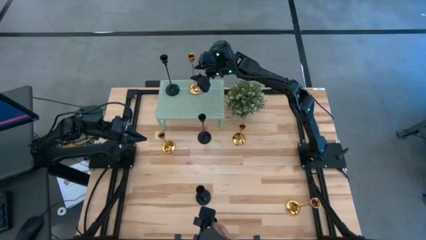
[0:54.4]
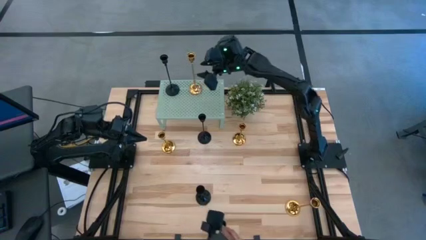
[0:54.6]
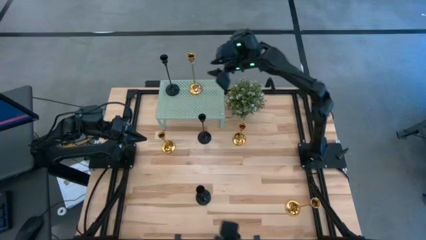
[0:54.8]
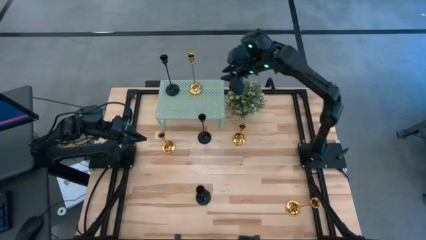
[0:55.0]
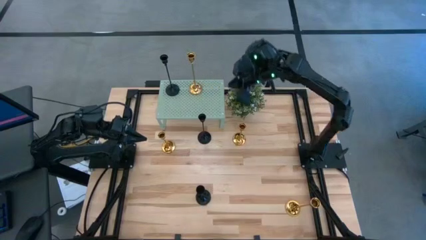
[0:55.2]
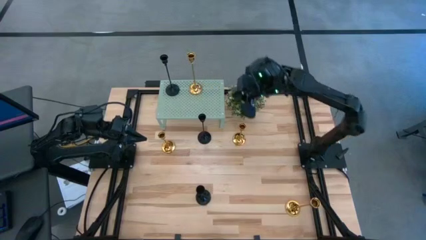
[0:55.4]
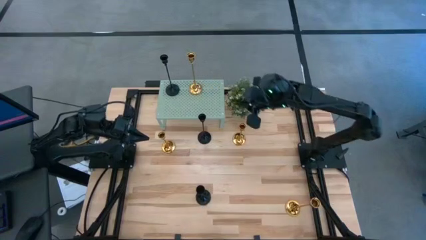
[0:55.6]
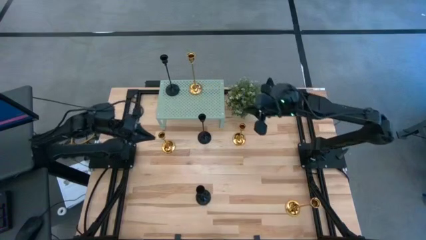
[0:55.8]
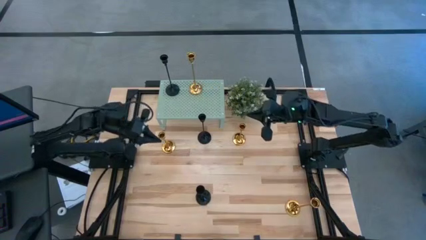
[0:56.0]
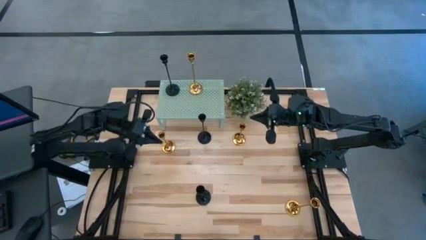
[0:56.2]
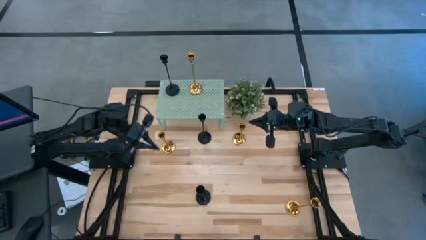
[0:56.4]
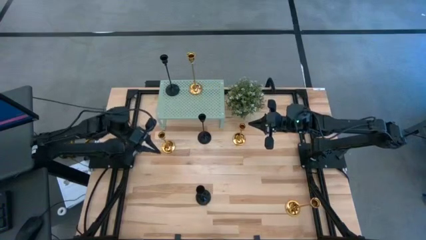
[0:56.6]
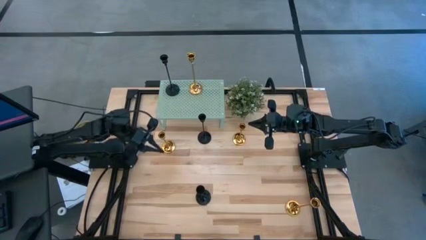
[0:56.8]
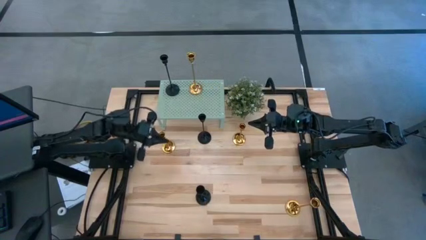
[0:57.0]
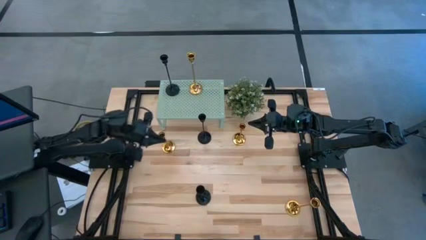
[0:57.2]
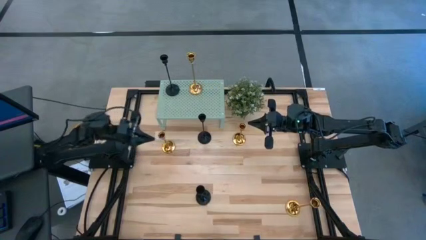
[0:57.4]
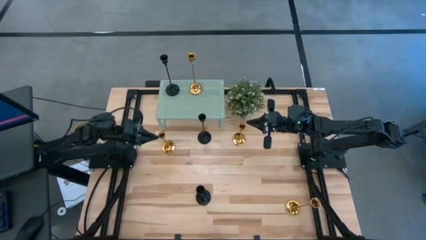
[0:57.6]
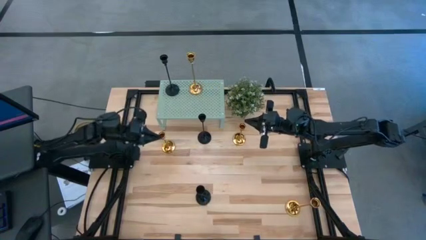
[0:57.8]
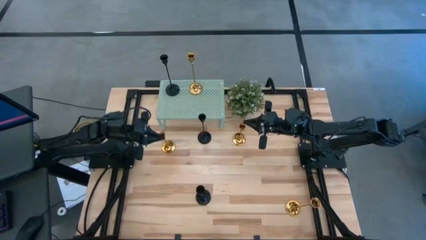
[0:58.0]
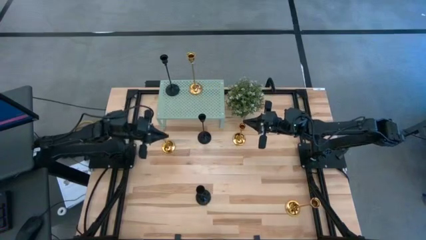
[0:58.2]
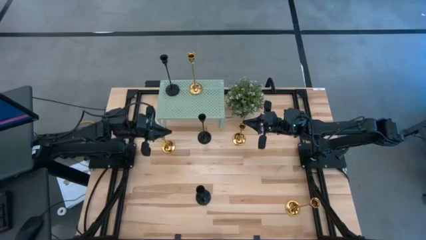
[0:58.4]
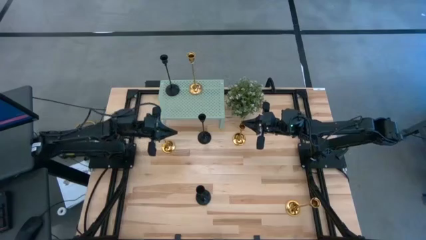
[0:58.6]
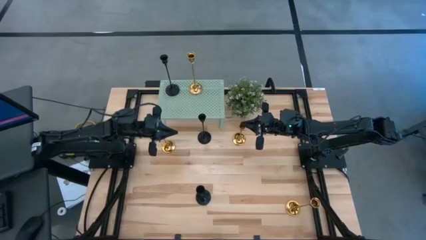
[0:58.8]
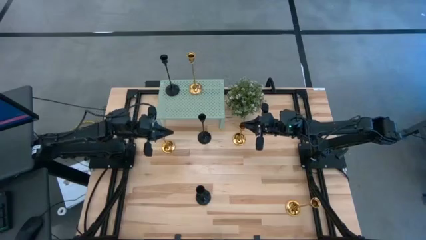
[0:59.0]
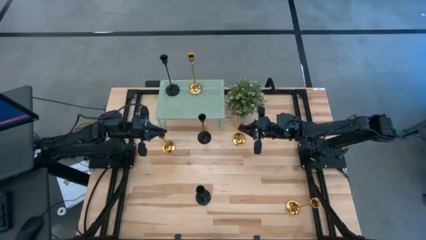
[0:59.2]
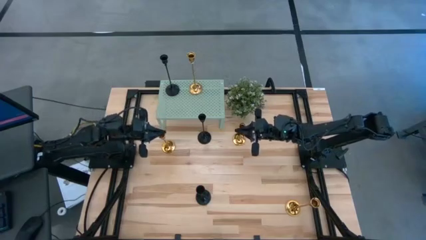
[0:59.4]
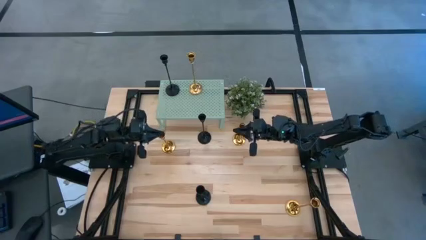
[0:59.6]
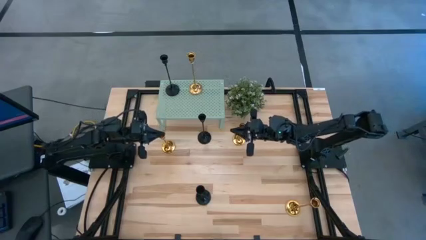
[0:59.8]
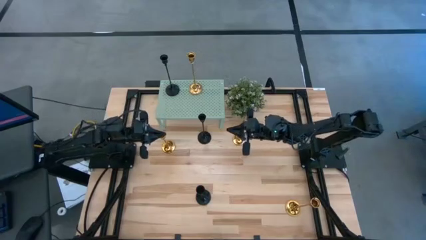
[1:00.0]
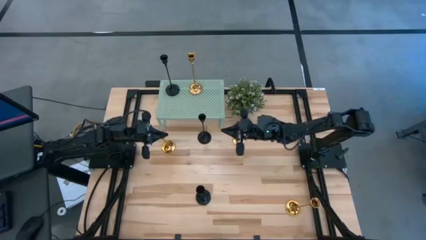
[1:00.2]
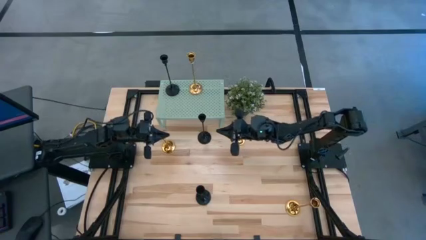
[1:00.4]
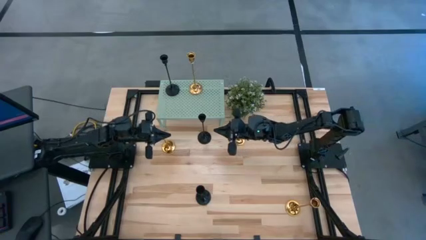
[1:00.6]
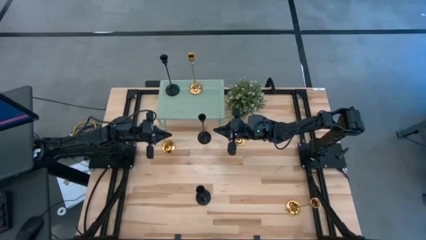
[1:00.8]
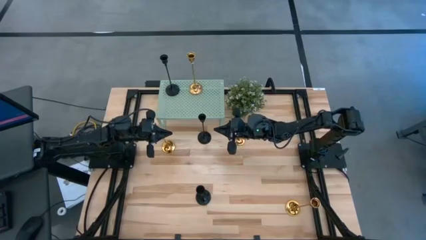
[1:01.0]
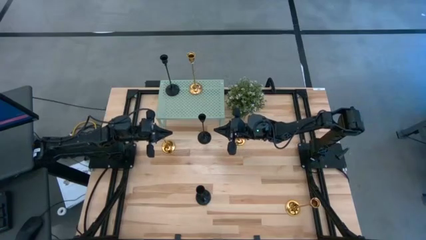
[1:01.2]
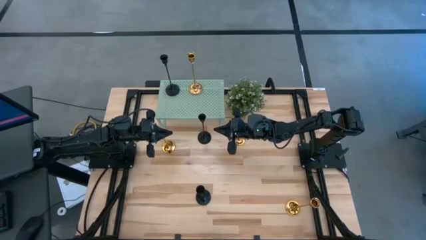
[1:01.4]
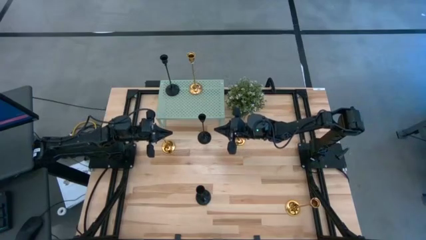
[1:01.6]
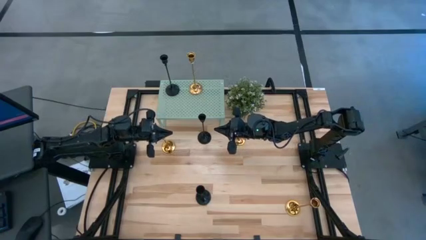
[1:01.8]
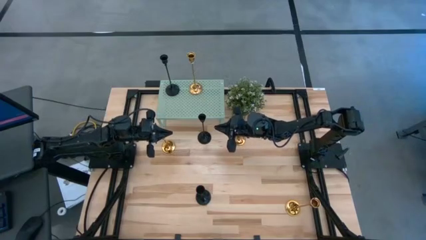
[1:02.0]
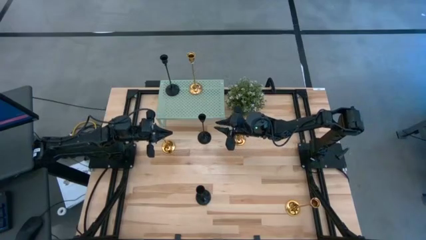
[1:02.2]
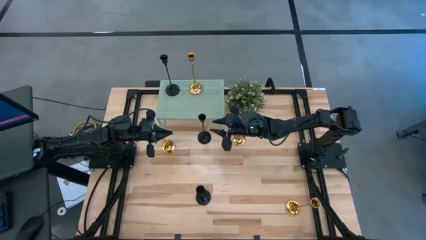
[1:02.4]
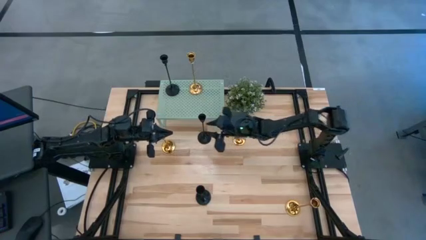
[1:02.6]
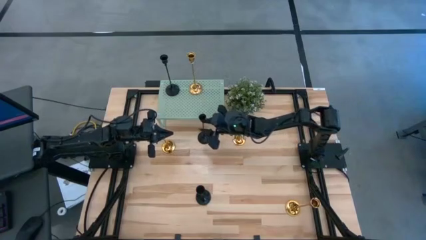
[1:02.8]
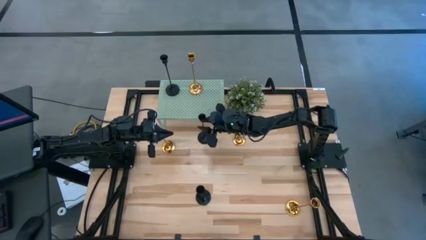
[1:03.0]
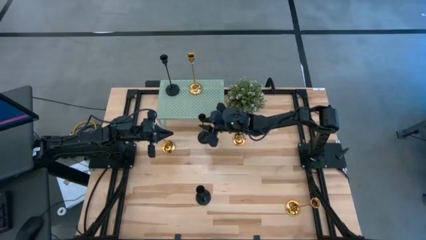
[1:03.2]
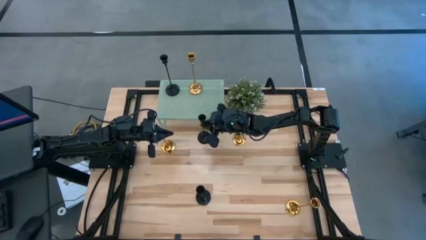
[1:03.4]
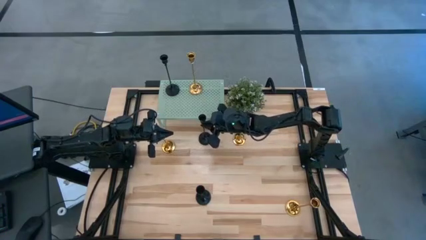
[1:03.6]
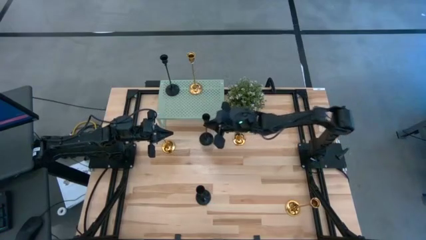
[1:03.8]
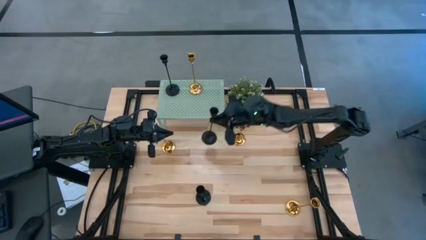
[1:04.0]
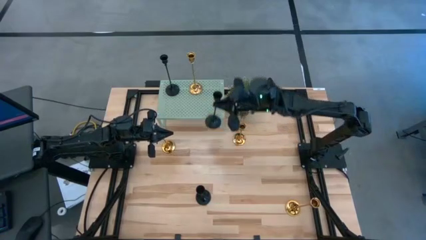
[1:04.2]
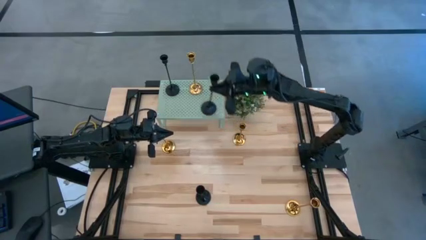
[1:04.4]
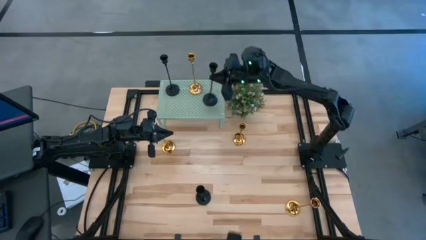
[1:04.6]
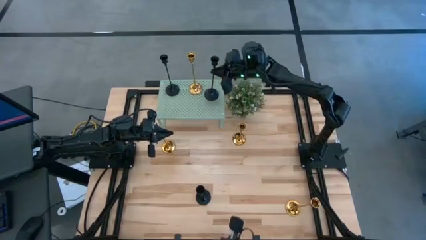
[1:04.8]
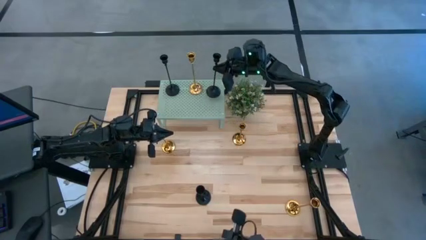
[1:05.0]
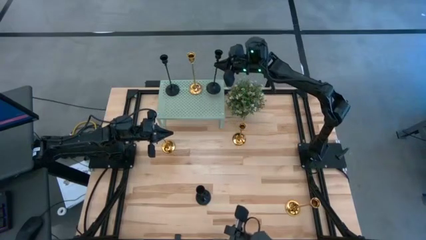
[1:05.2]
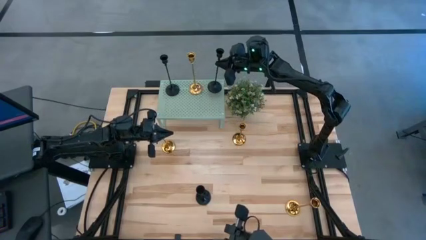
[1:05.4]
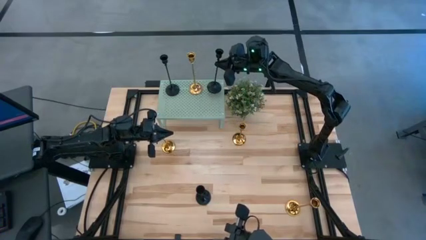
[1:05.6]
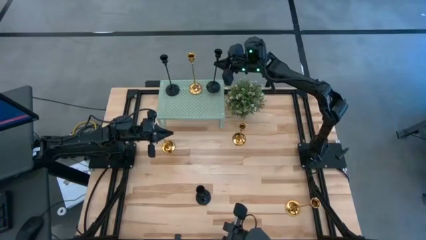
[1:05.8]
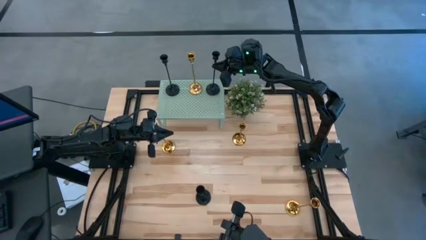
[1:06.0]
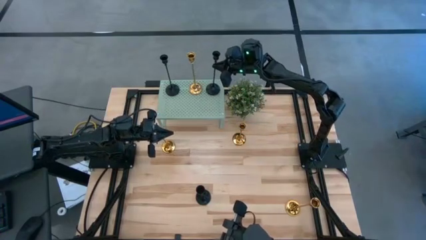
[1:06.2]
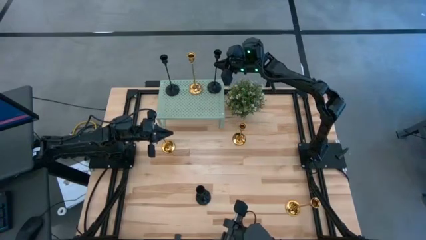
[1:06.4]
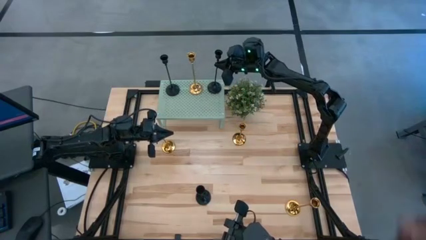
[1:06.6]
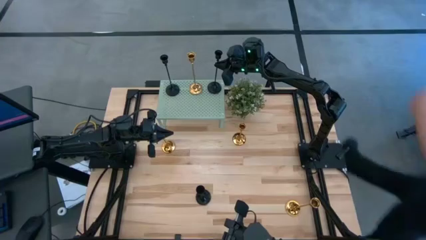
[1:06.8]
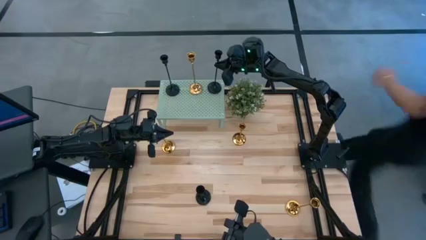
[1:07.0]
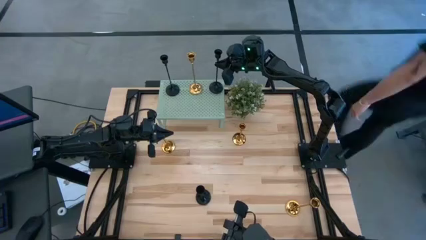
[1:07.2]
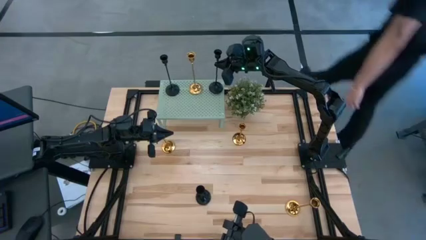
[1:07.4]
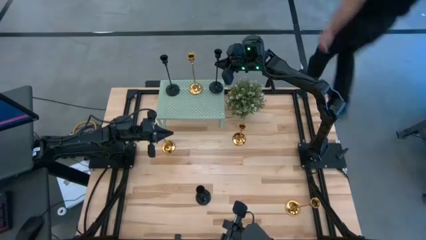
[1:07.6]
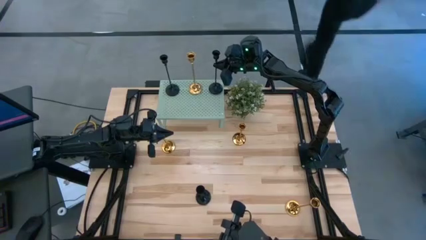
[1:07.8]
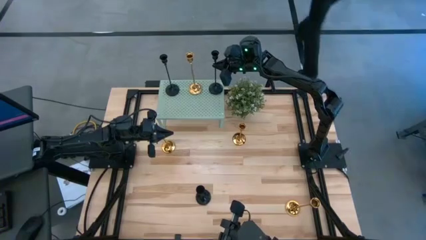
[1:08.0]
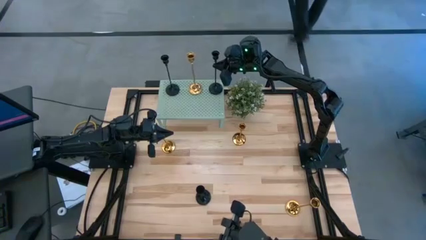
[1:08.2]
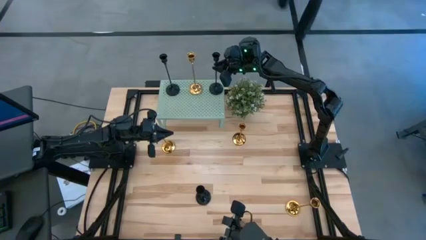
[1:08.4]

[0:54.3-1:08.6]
Task: Pick & Place candle stick holders
Put the gold candle holder on the shelf aligned with the gold candle holder

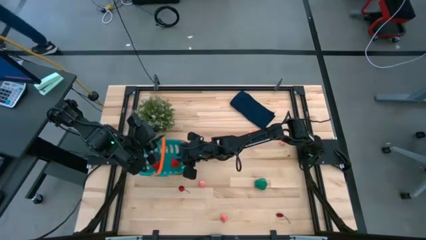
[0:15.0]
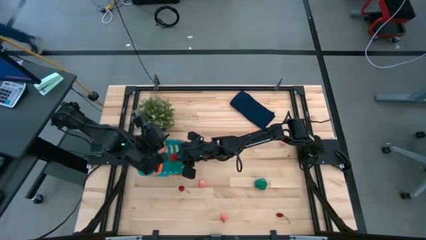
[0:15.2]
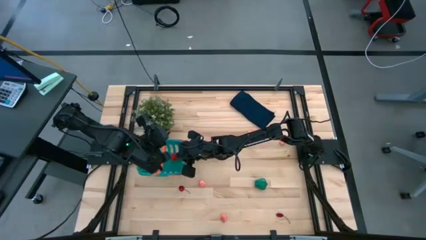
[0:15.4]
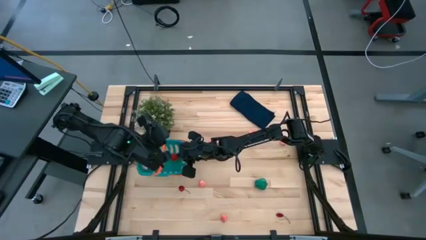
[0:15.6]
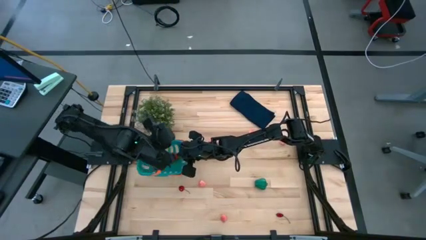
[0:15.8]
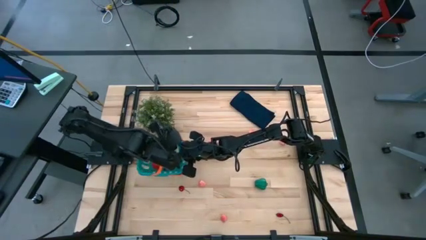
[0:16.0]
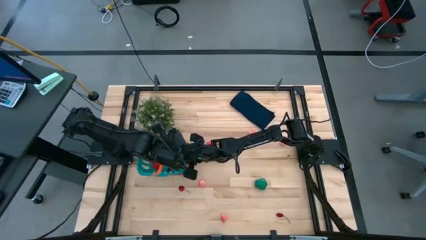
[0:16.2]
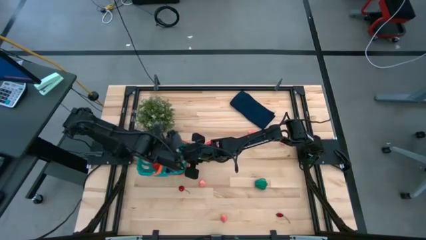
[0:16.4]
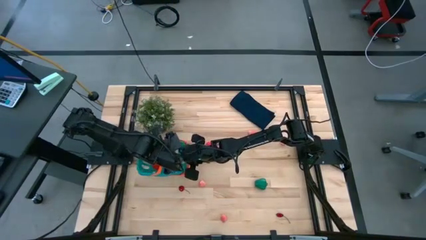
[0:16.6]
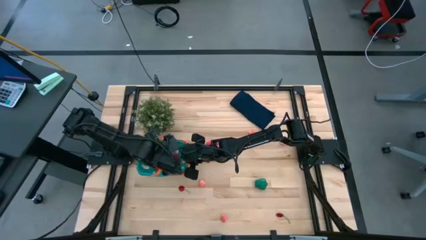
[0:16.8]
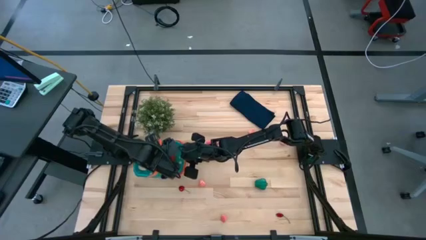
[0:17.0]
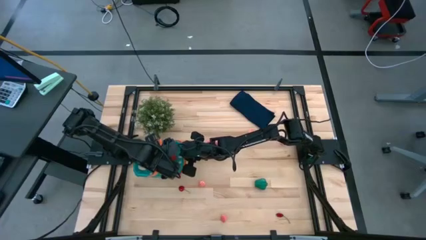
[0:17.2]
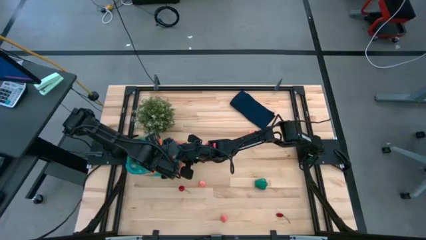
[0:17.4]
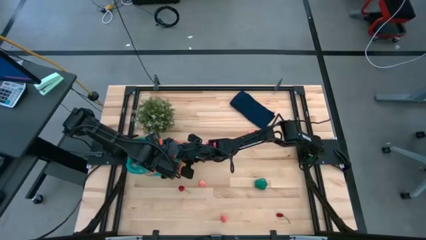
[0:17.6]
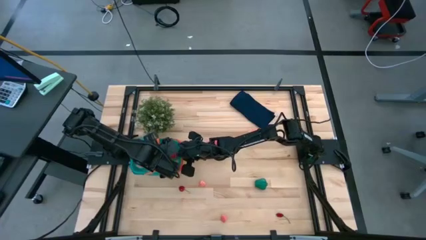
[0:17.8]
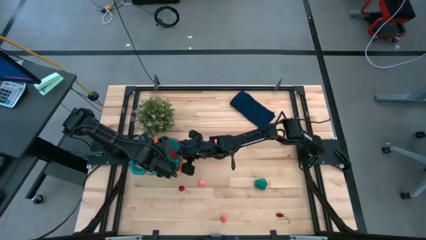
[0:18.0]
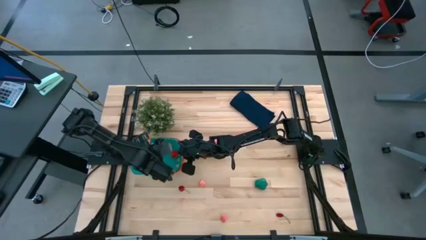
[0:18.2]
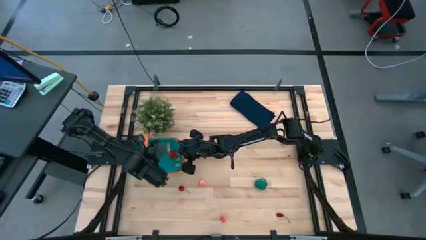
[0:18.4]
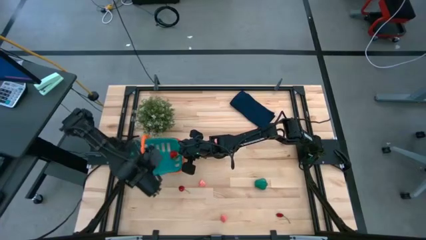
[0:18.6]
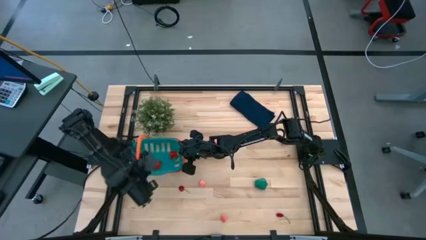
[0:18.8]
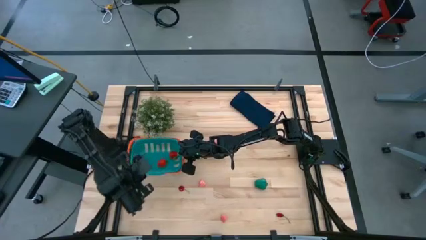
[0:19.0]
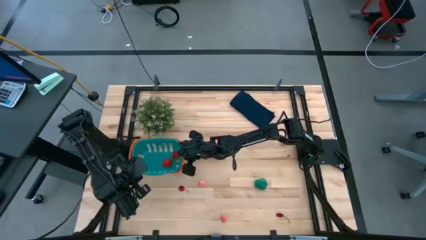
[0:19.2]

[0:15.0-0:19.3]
Task: Pick and placing Produce into tupperware
Adjust the green basket
